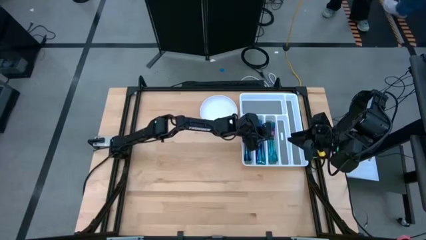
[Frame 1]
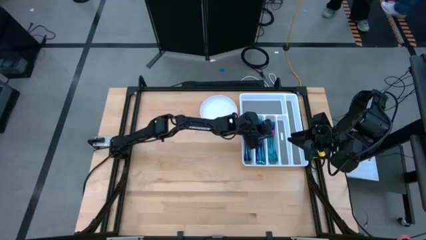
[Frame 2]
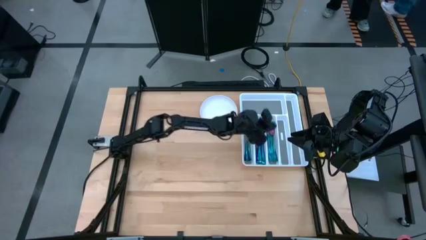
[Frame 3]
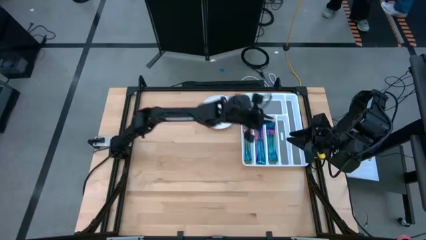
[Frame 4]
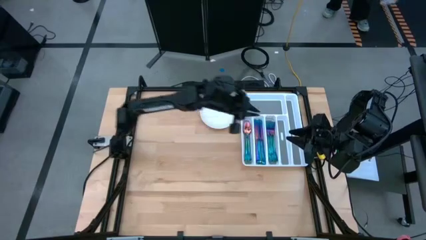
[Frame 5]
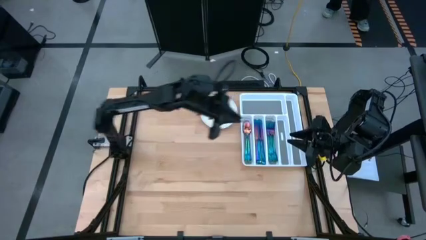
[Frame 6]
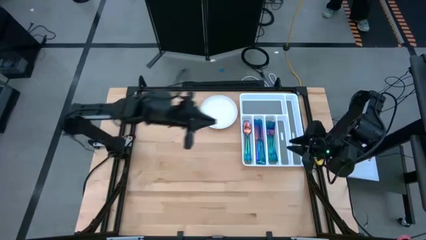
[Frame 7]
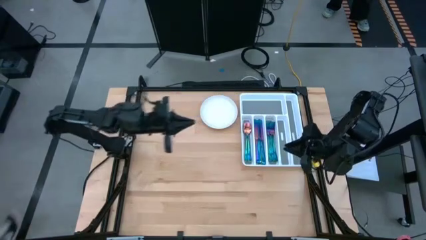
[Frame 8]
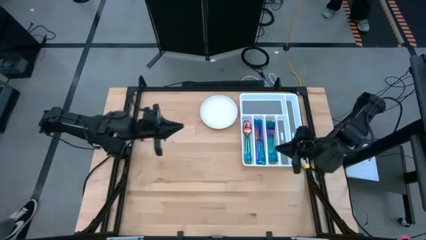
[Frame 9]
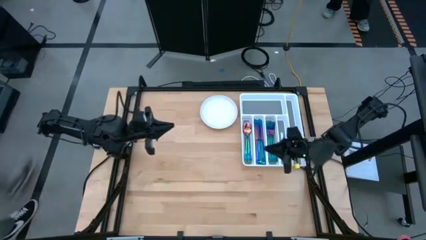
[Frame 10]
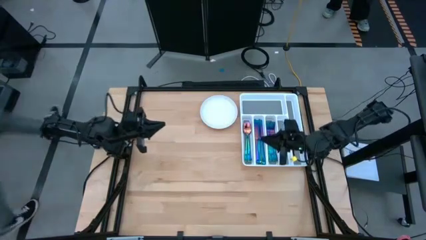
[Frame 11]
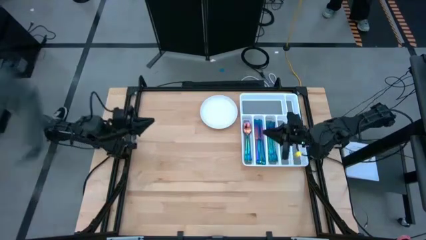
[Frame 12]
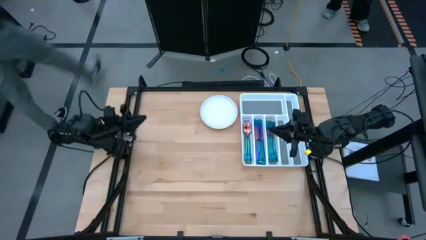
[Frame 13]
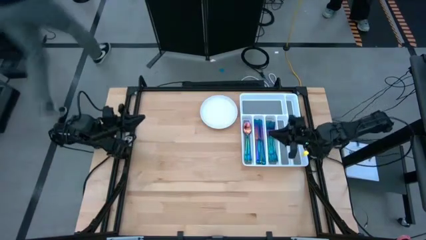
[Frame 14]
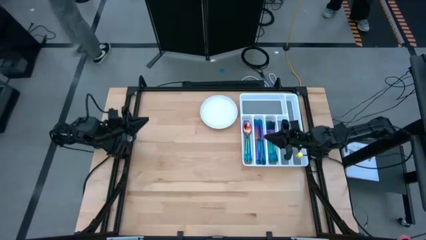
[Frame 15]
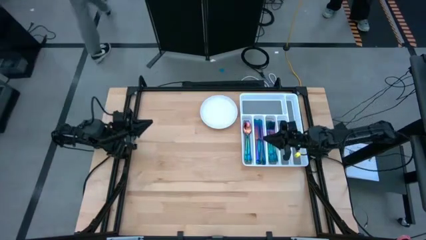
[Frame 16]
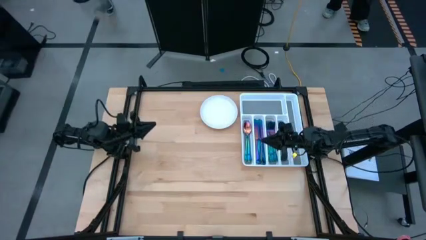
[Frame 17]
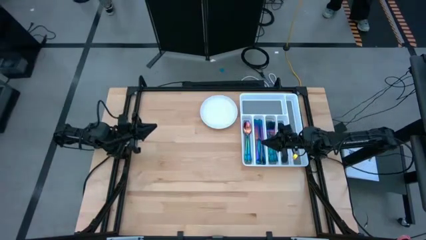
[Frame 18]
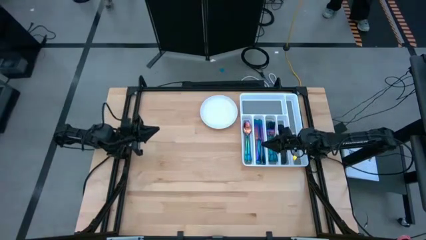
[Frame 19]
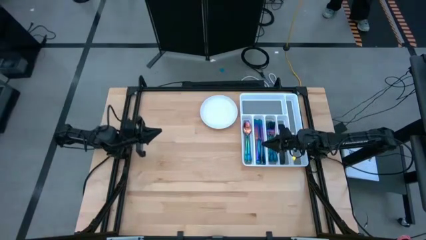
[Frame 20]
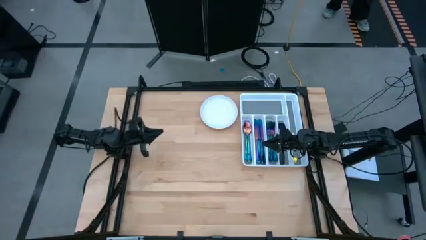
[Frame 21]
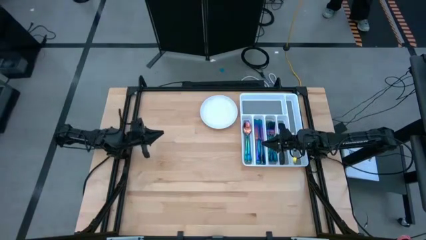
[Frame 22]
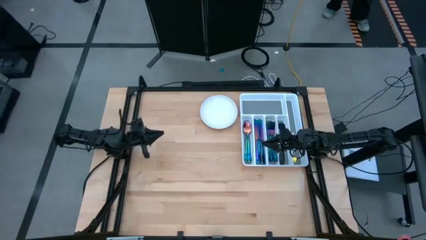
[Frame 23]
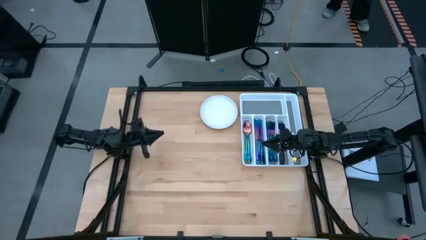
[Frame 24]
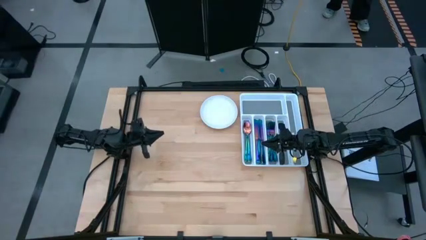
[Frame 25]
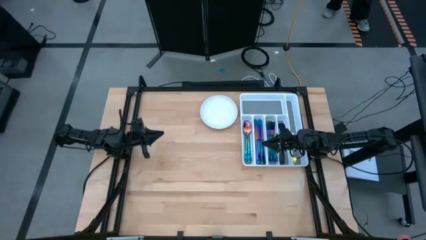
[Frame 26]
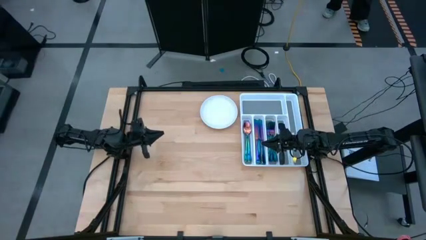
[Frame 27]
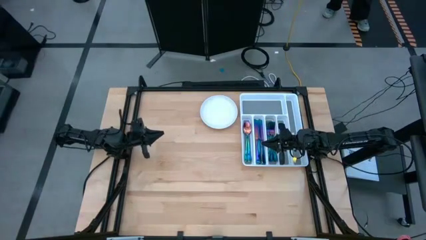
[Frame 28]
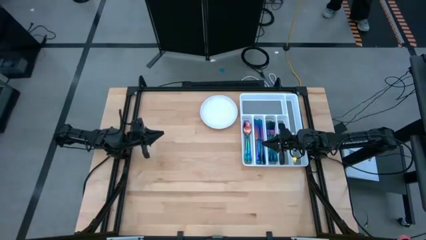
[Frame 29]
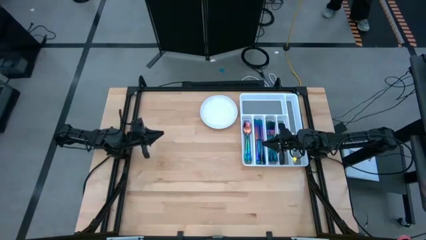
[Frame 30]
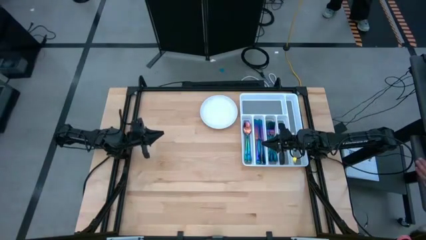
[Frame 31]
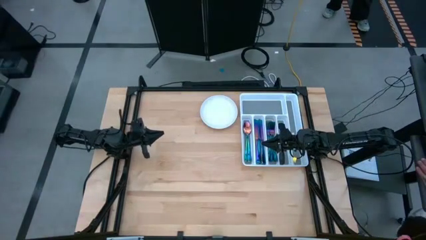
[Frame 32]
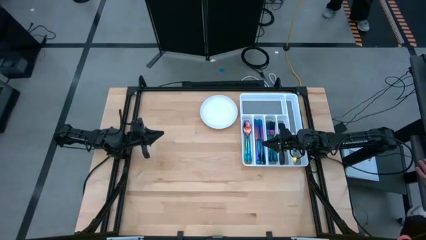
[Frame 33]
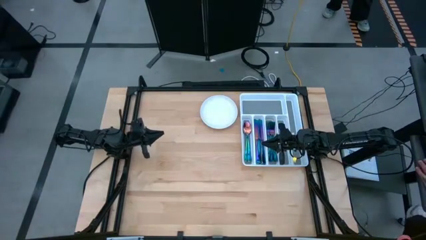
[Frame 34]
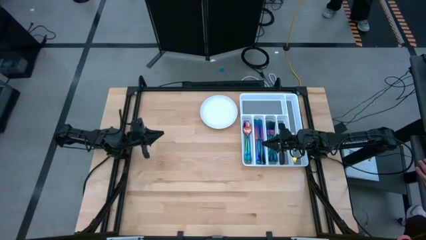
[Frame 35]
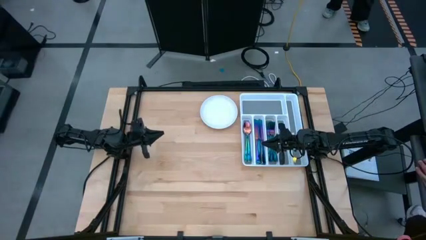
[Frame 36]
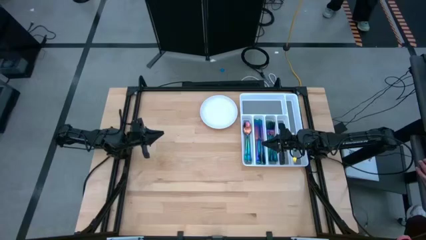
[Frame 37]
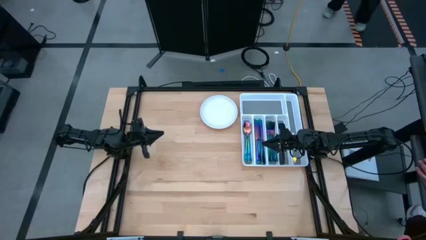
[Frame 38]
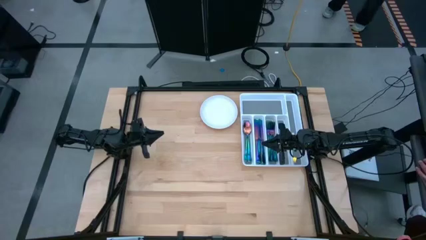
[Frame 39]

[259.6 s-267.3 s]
Task: Sort silverware
Return to Home Position

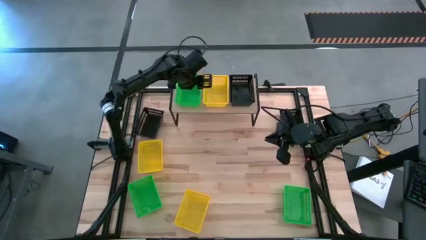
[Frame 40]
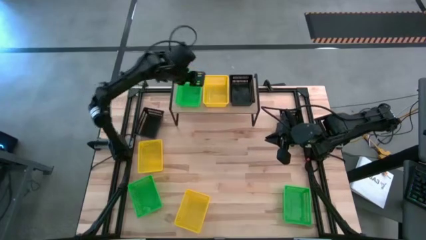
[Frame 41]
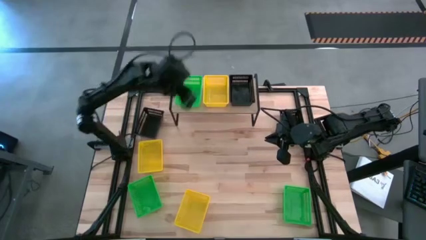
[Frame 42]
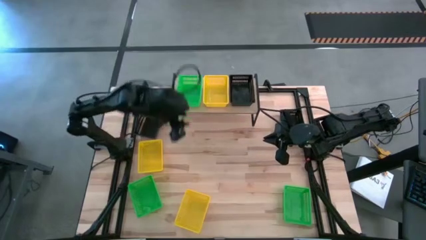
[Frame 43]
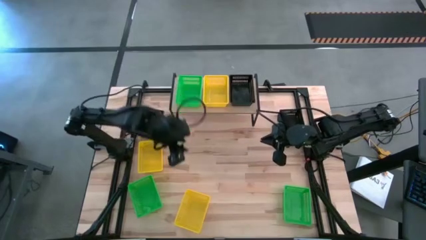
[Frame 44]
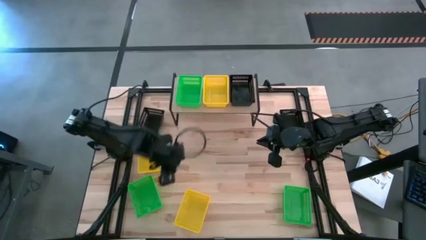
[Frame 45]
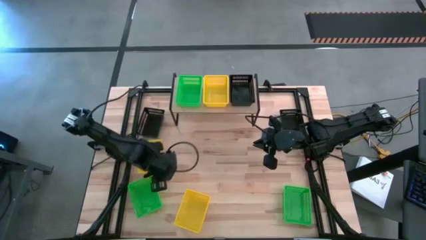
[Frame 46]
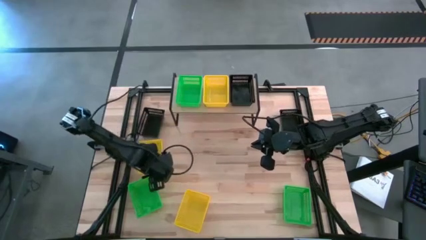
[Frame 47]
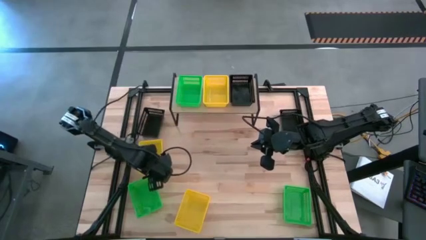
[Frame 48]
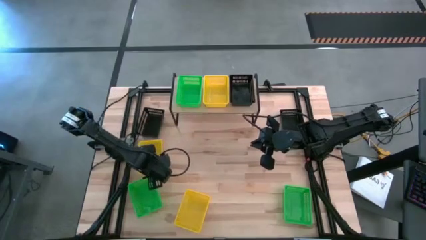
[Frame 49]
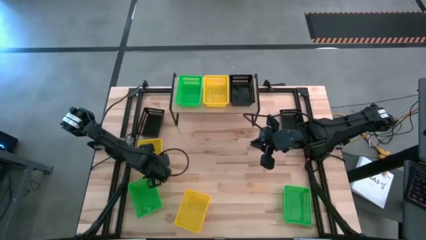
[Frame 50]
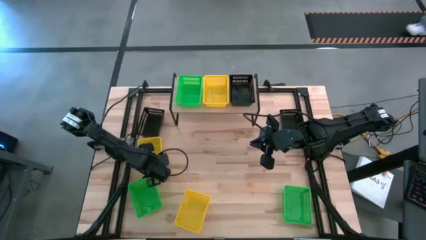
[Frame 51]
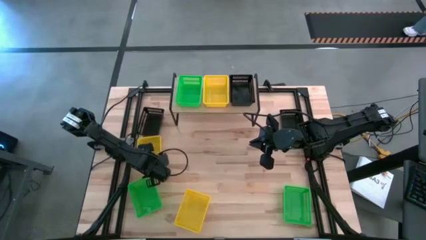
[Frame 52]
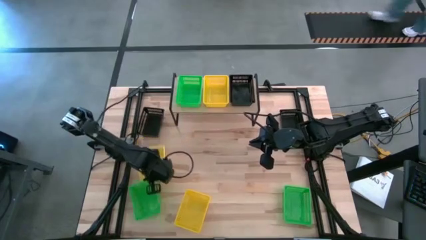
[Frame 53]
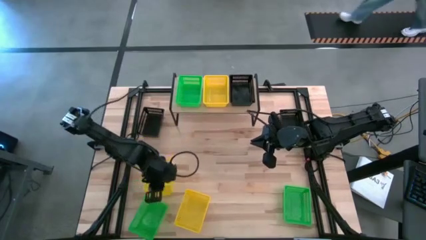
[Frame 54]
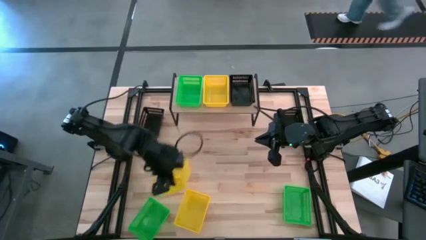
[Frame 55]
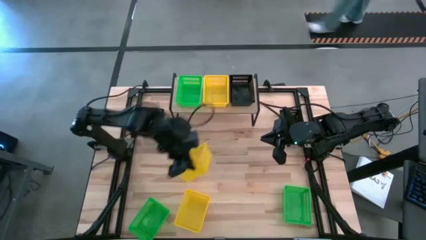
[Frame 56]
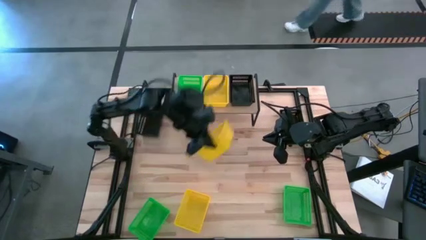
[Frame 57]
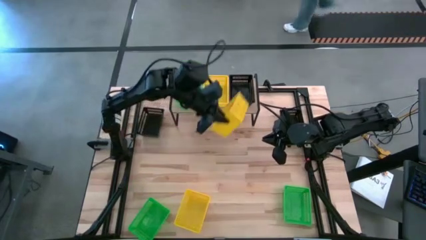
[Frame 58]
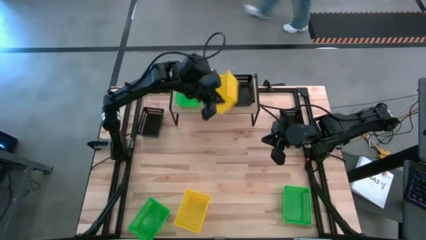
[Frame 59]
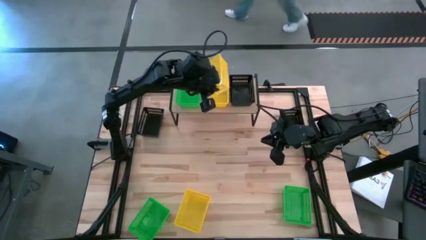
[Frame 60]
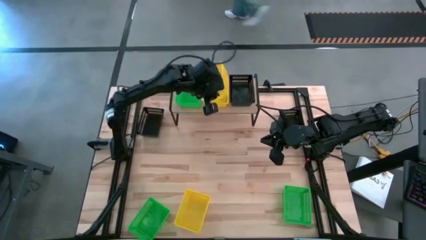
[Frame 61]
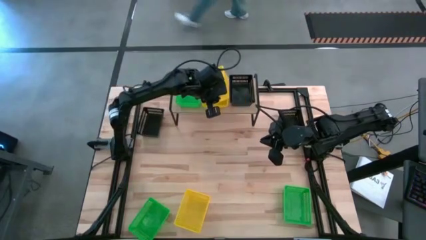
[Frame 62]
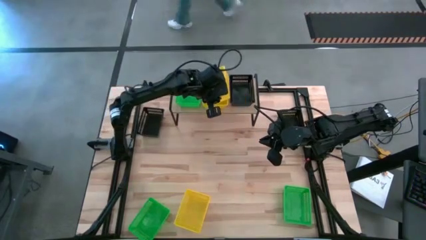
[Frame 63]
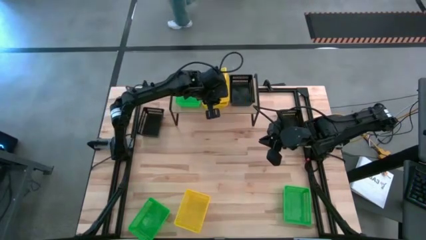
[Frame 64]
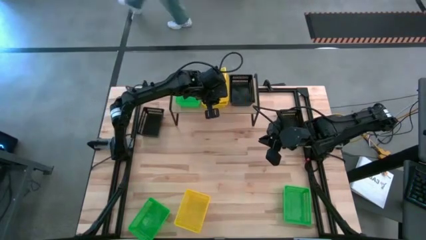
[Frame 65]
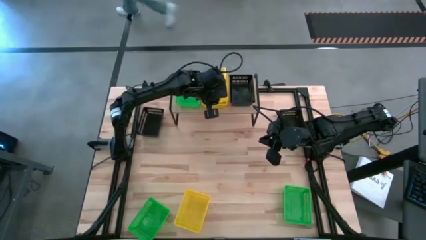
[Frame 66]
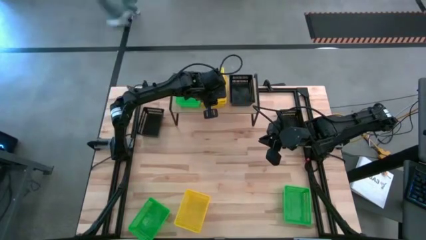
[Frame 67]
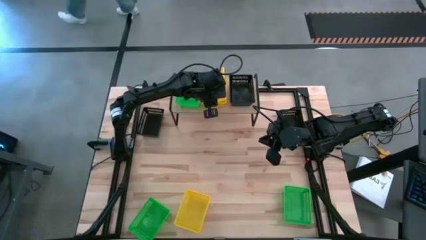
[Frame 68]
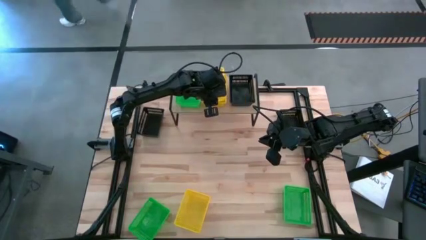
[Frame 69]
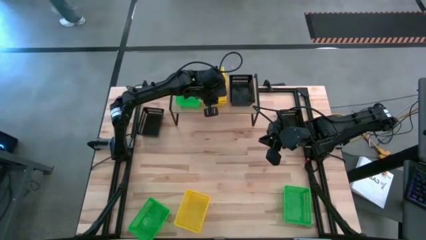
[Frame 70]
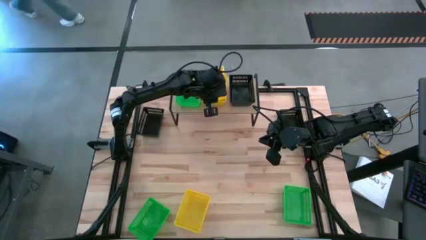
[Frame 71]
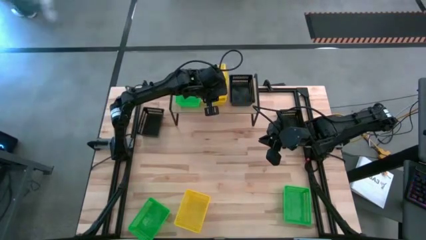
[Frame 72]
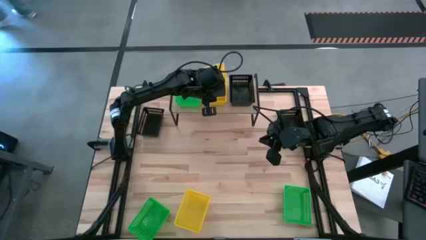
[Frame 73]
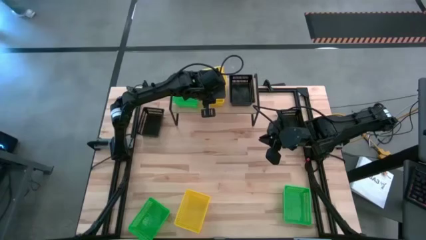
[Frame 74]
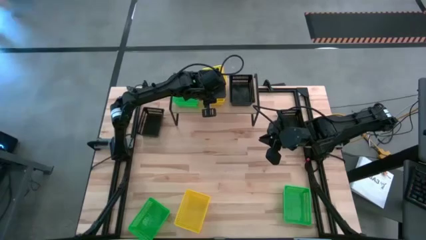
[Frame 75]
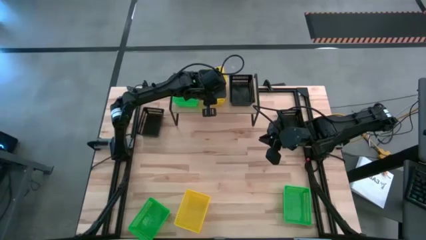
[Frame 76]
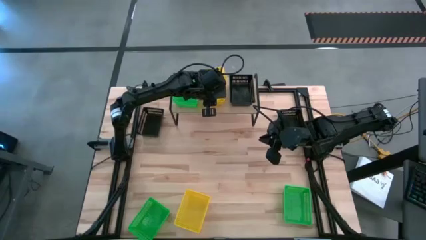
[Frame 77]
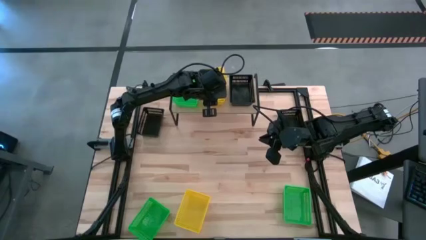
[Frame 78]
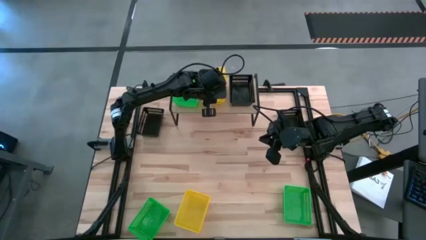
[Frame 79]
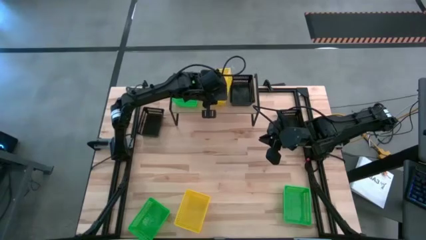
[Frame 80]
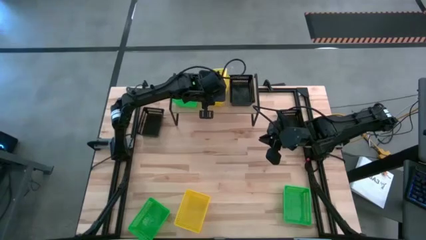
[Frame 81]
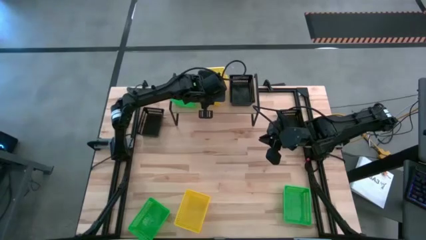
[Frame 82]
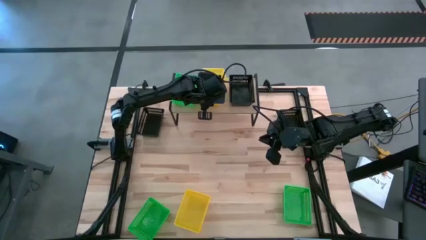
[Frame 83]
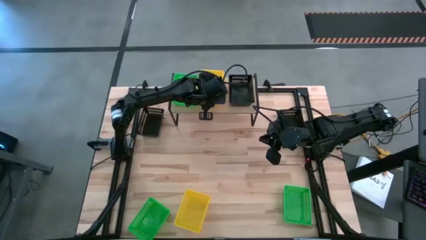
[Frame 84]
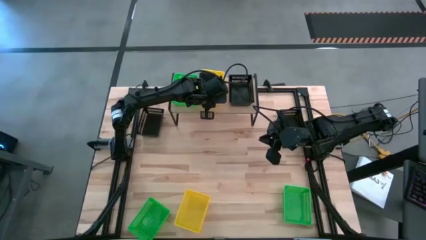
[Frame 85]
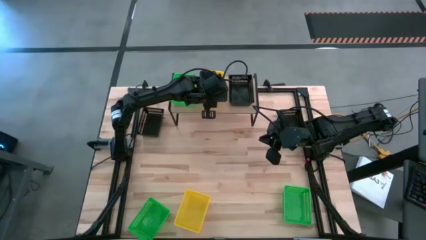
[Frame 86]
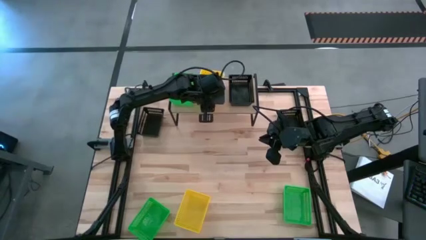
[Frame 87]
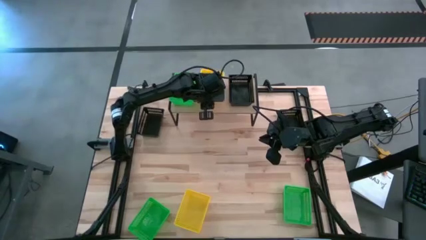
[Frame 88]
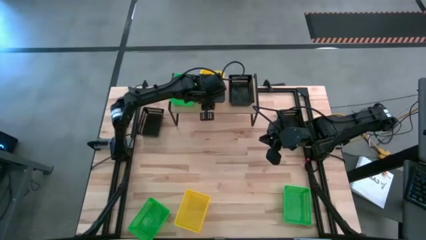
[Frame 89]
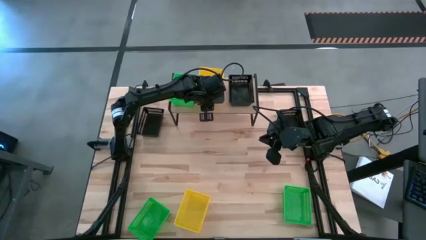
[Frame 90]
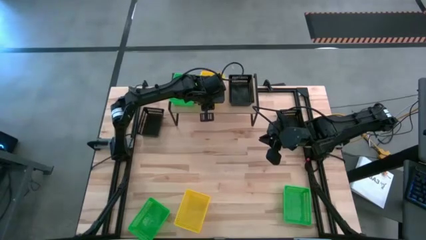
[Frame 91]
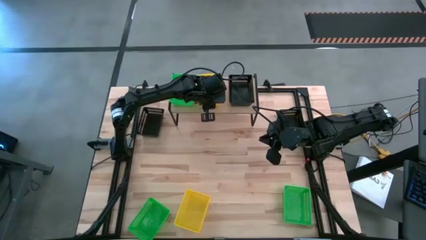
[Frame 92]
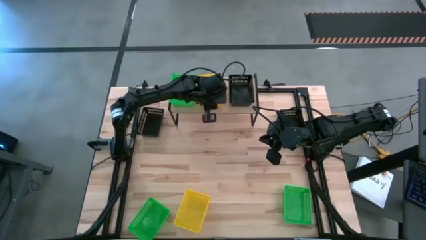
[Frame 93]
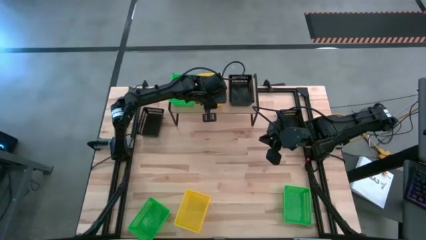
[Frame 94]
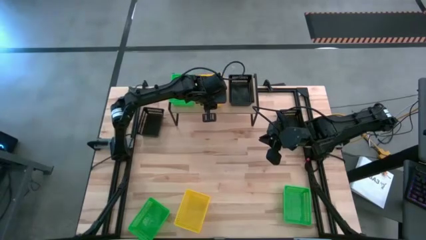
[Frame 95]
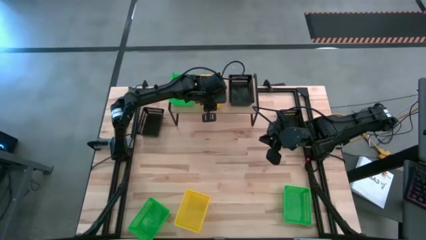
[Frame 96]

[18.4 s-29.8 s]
Task: Stack baskets on shelf by color
Stack the top yellow bin on the yellow bin on the shelf
